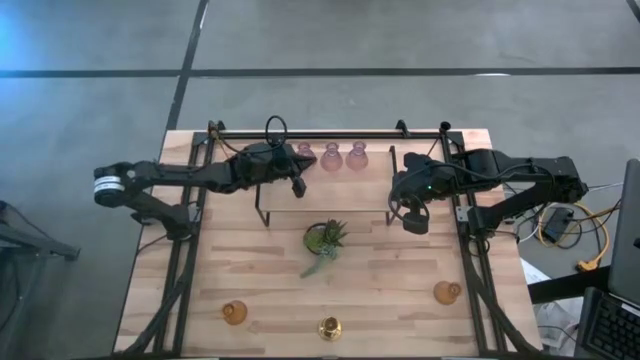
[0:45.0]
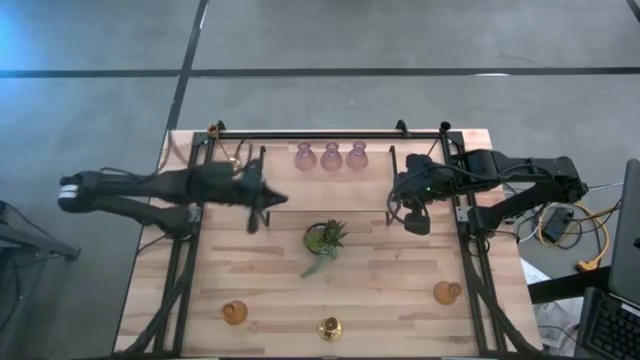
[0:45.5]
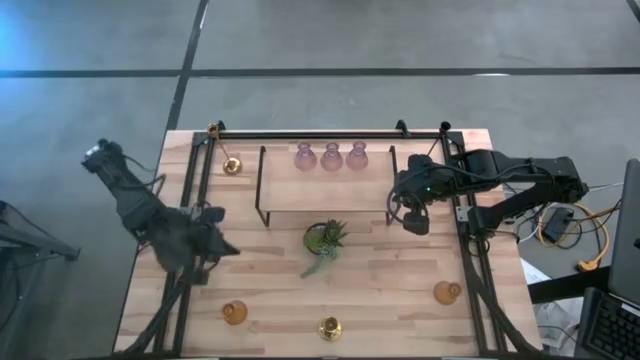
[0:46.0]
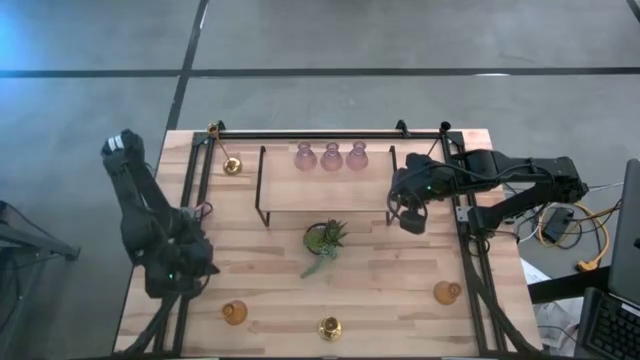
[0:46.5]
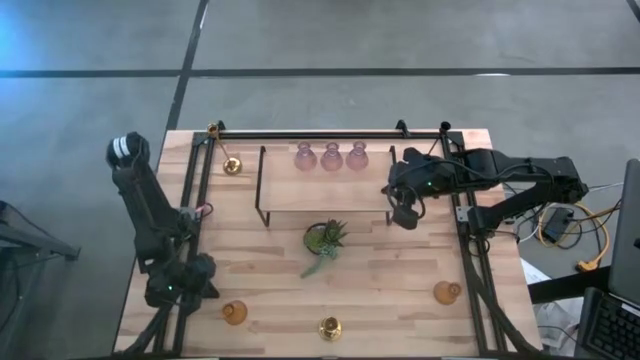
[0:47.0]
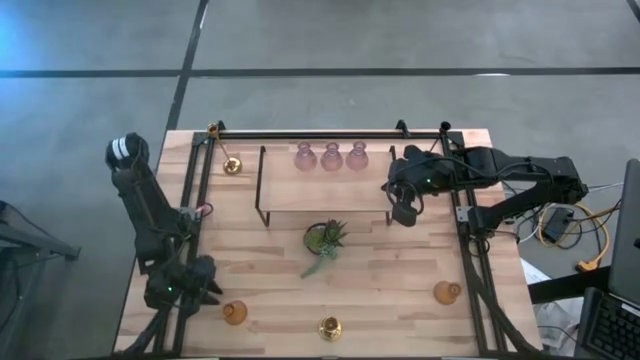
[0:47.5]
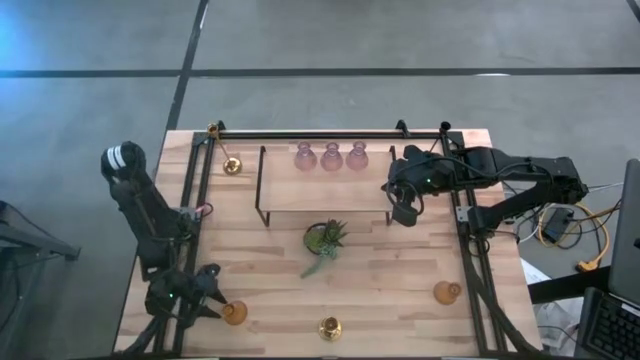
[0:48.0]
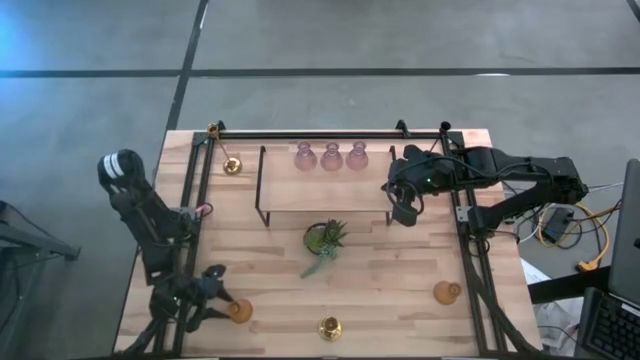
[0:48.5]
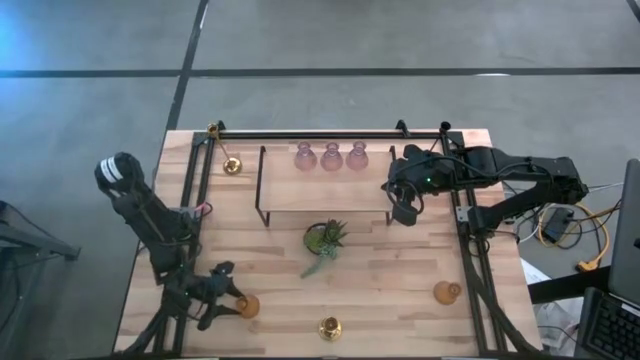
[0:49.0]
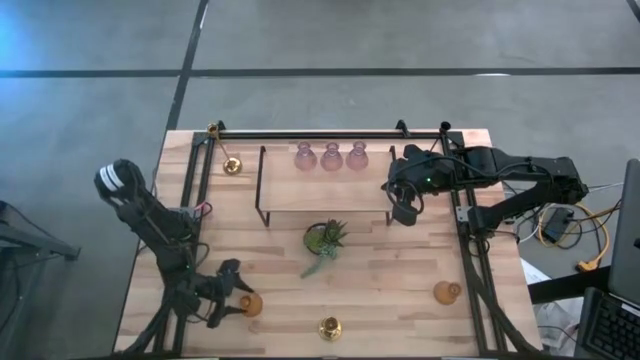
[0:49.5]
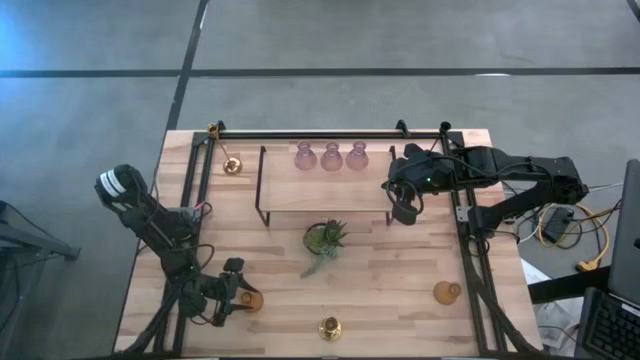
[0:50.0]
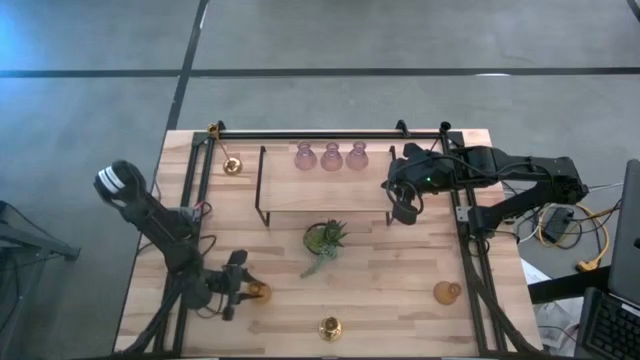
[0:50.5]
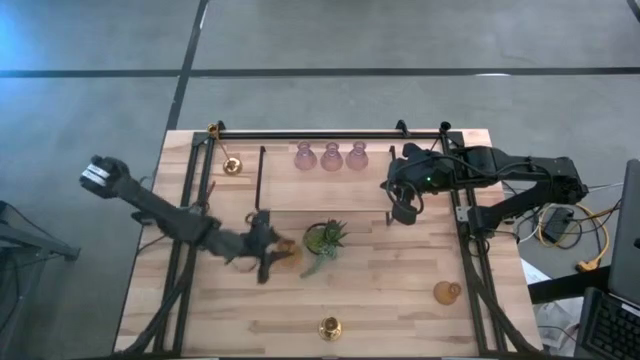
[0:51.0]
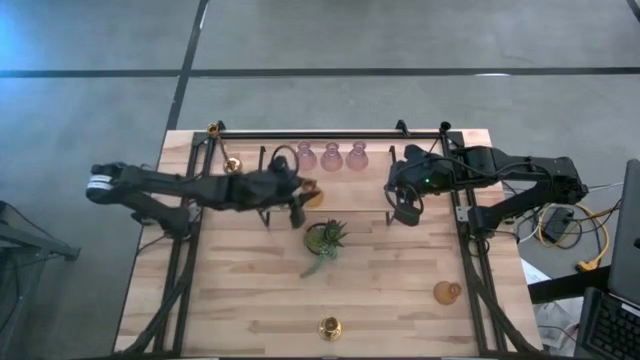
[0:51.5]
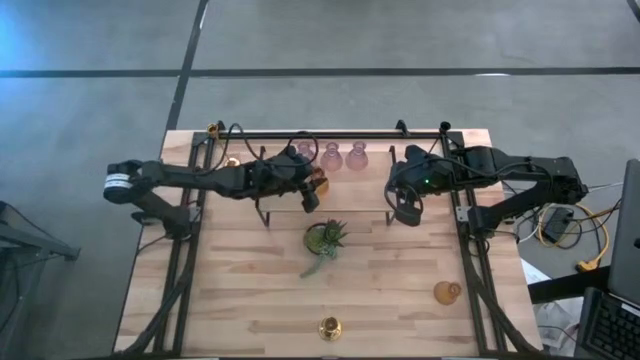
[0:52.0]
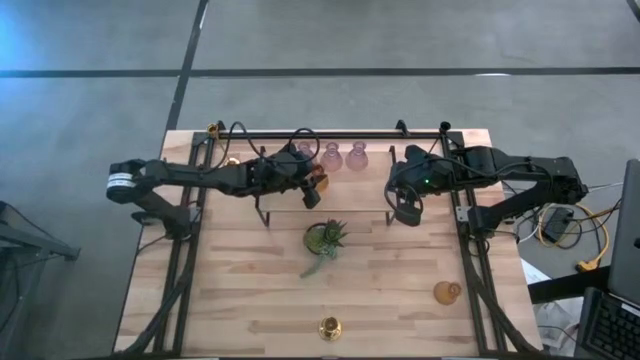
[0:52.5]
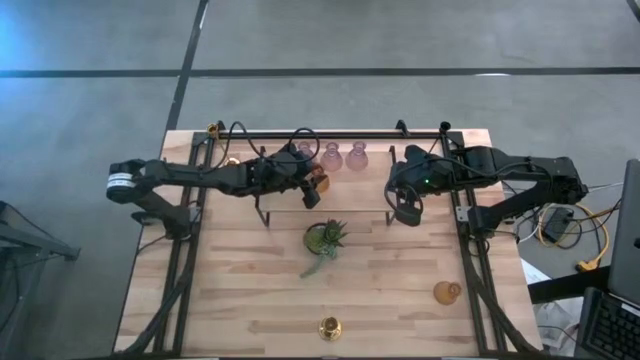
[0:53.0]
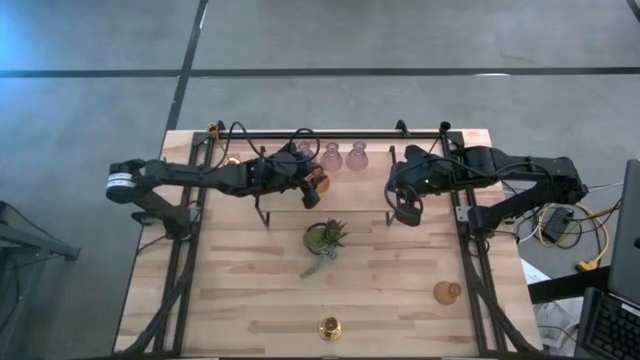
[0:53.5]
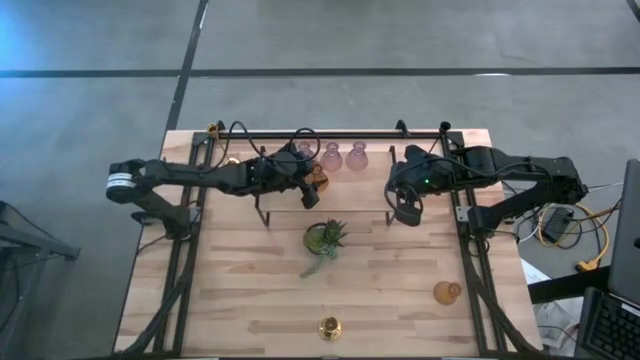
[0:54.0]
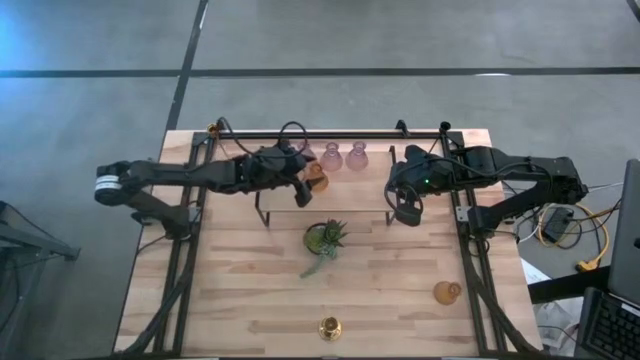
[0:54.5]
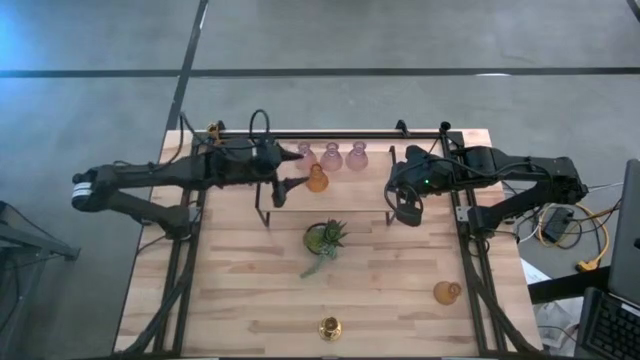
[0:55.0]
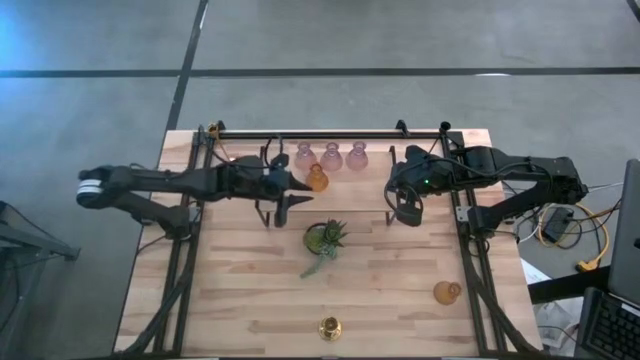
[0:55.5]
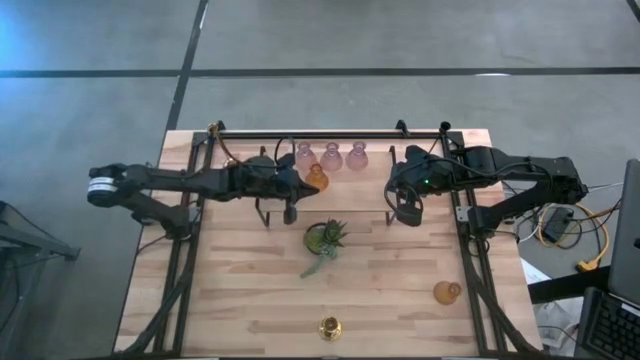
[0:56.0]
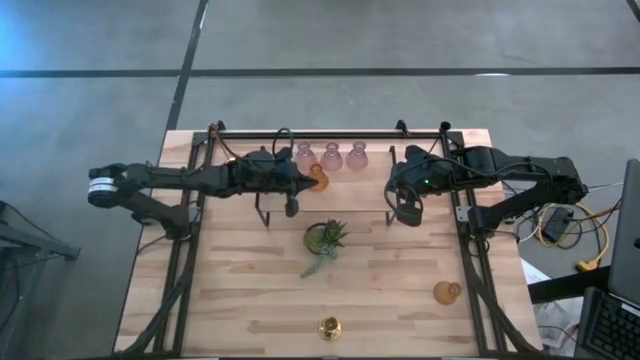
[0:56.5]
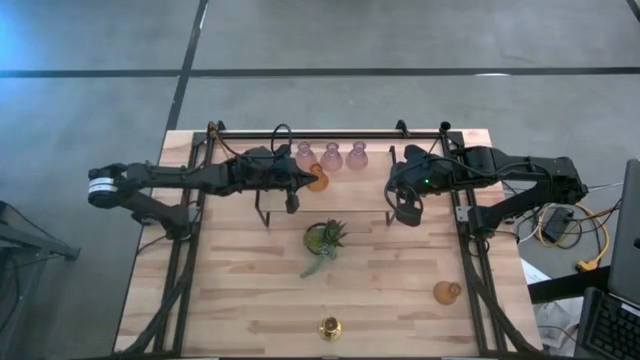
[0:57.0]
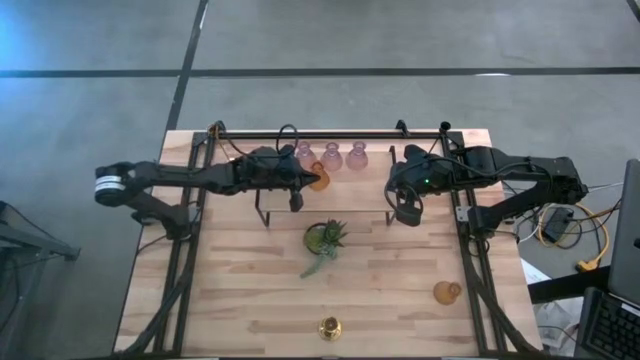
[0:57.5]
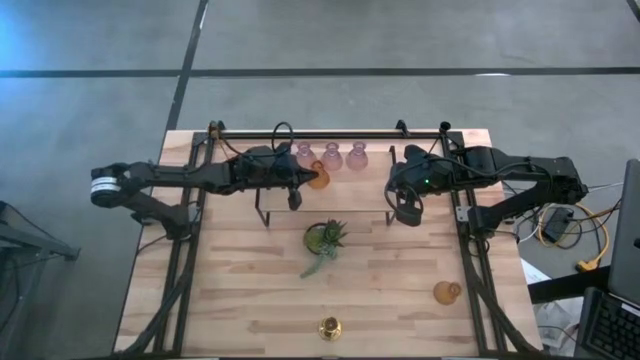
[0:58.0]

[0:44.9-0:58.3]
Task: Pick & Place candle stick holders
Put the left yellow glass candle holder on the shelf

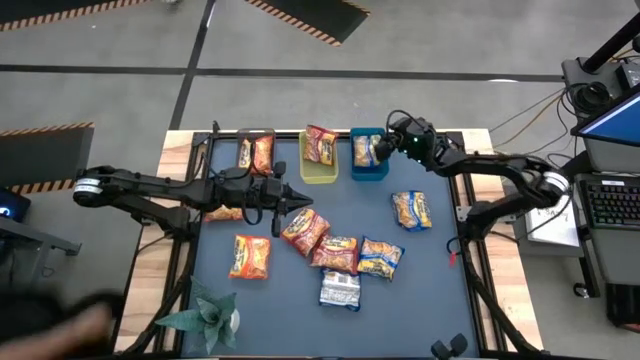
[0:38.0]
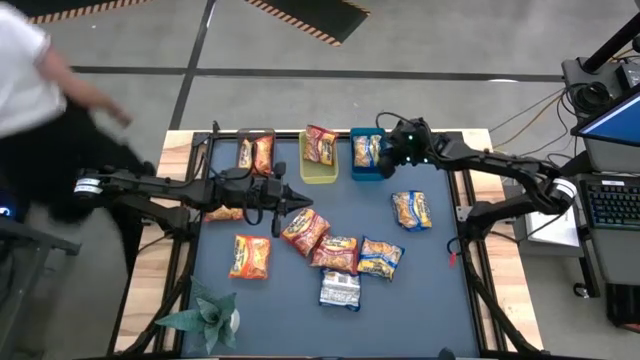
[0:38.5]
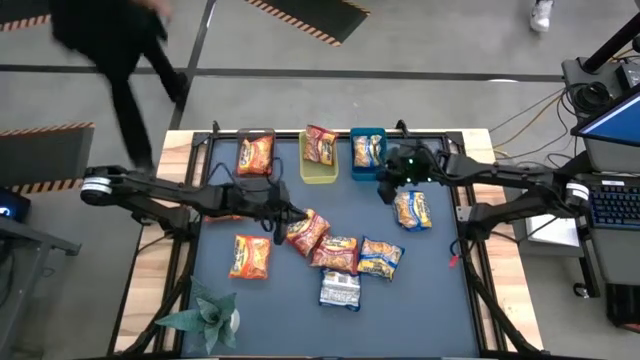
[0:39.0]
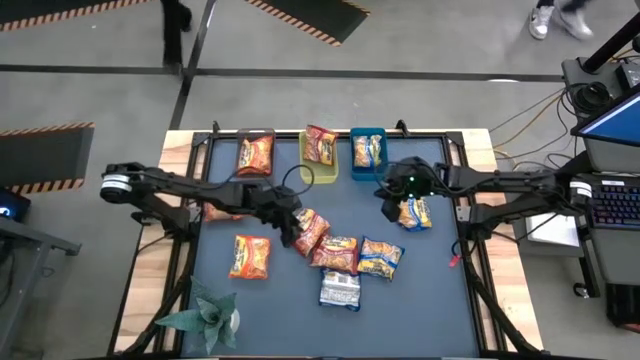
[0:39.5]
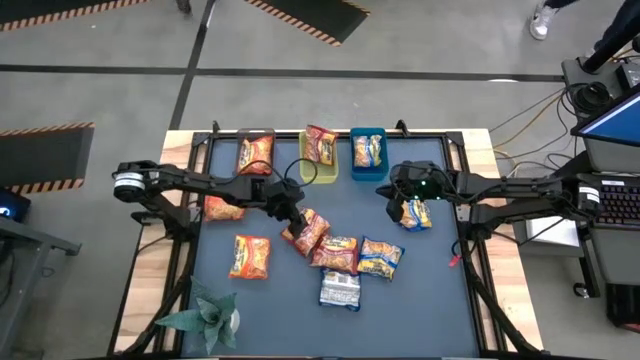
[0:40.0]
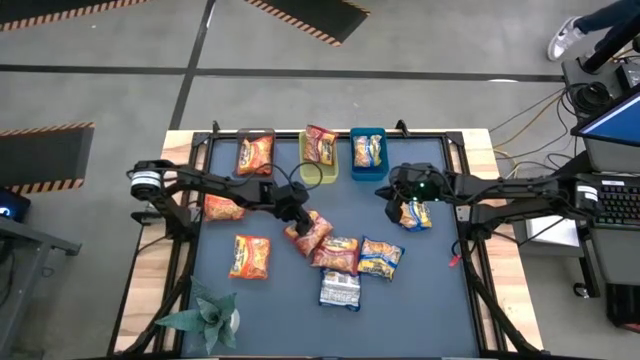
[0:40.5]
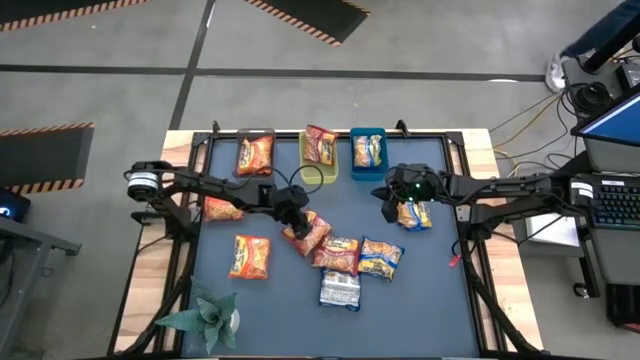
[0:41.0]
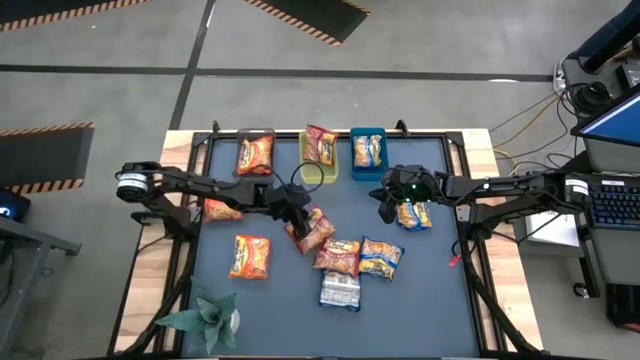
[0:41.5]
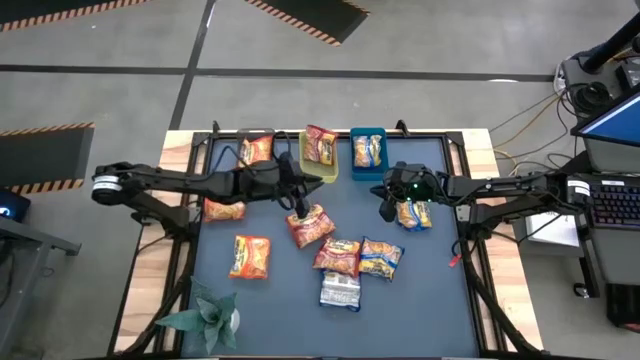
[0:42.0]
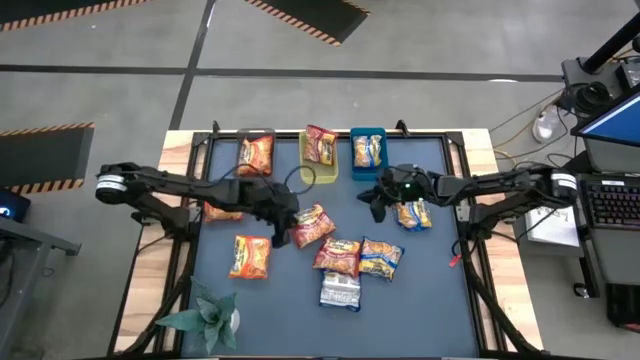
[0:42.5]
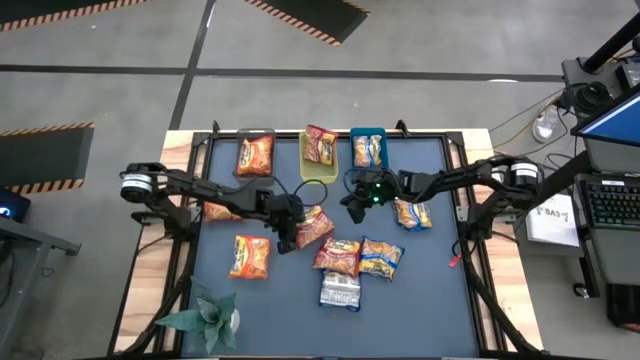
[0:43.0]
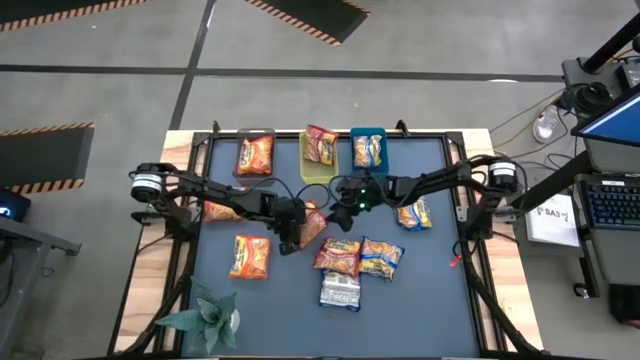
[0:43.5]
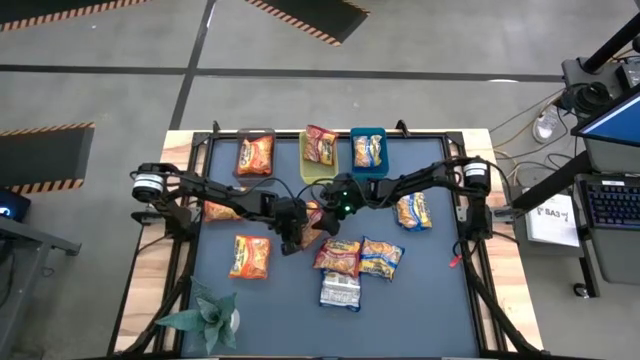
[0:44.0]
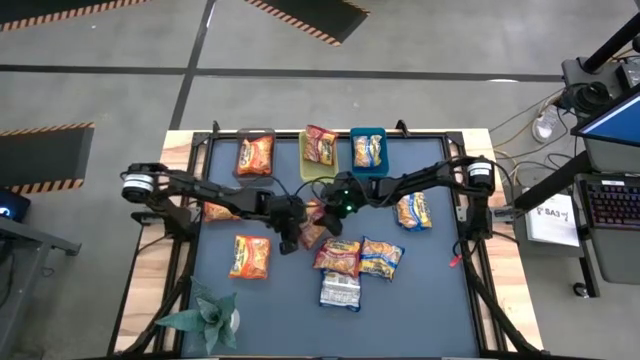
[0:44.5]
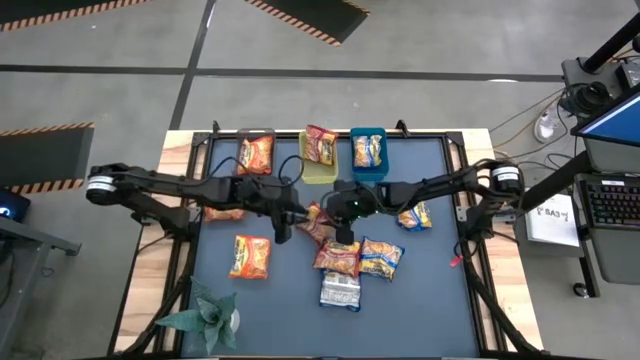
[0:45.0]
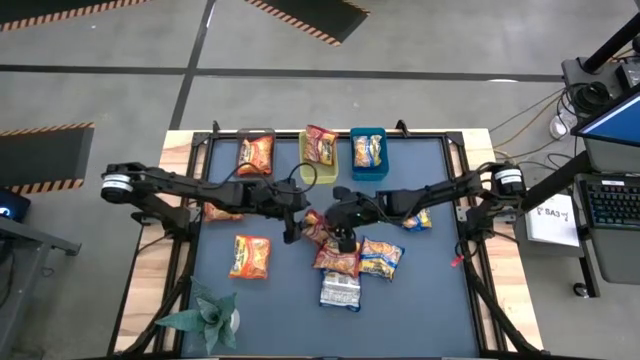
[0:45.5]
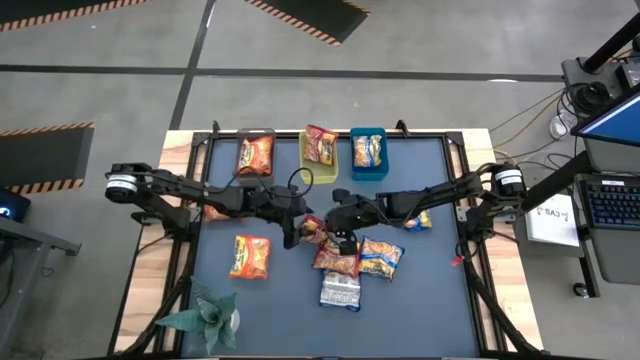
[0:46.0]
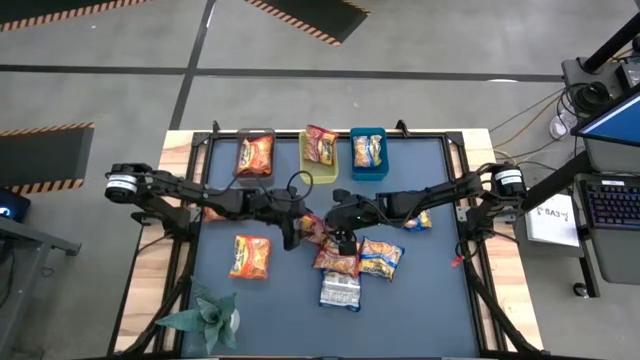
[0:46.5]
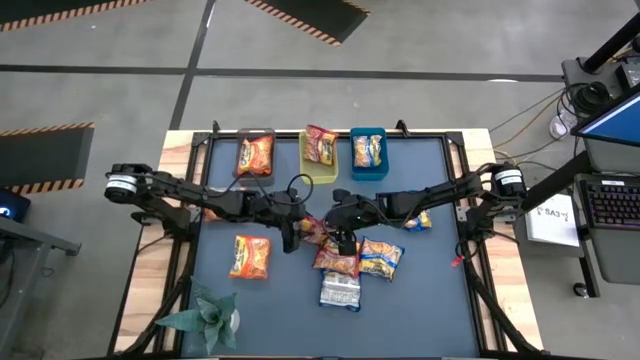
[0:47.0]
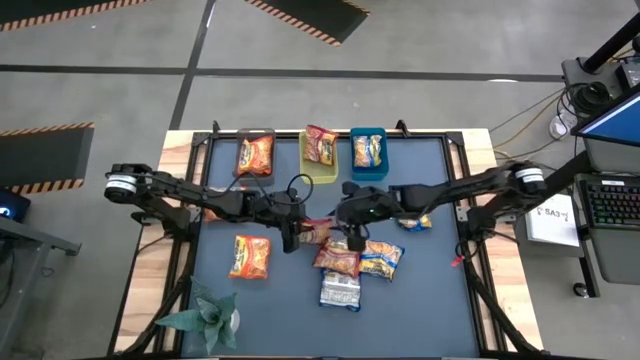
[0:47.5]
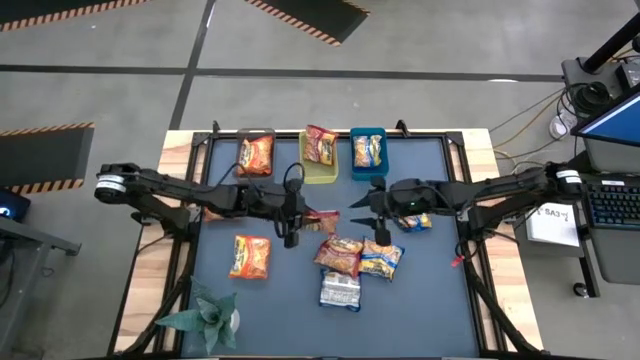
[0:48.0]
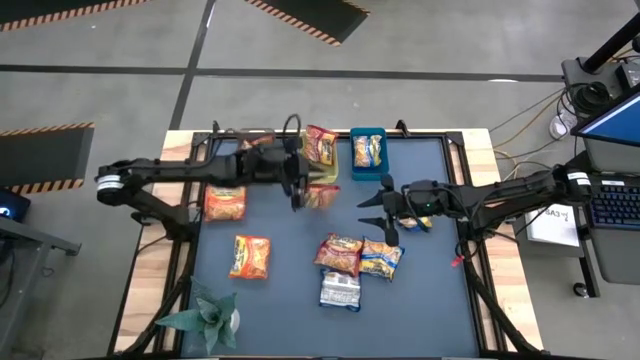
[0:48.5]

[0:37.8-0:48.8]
Task: Sort Maruchan noodles
Put the red noodle pack into the yellow bin
